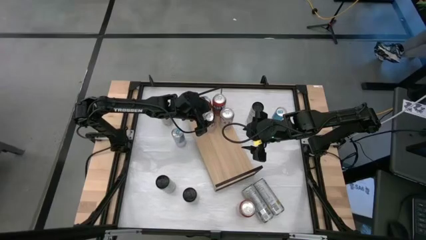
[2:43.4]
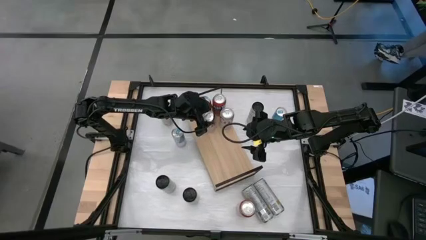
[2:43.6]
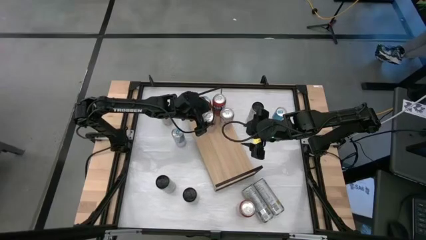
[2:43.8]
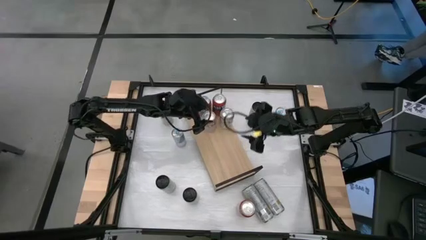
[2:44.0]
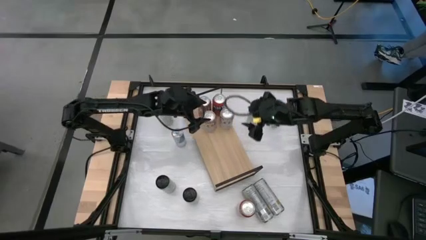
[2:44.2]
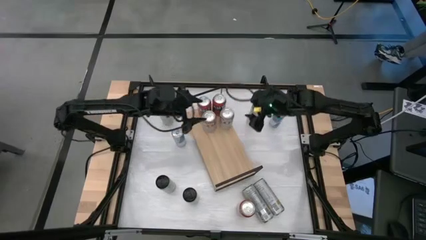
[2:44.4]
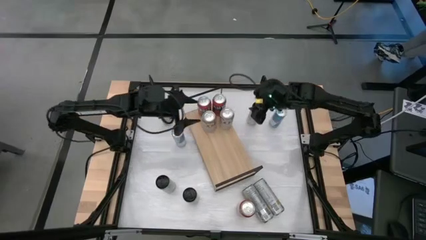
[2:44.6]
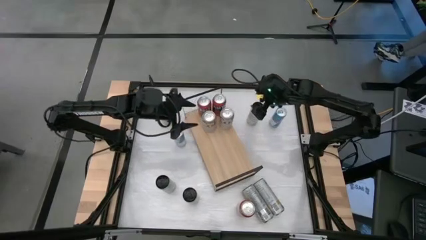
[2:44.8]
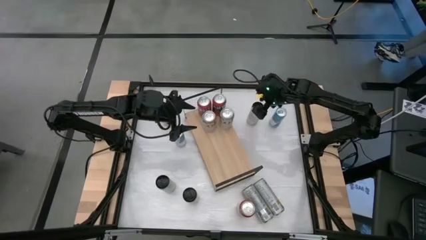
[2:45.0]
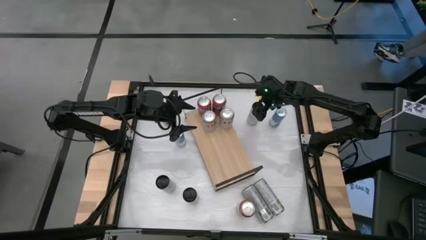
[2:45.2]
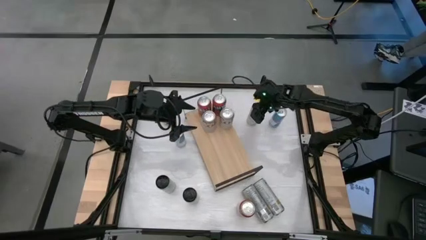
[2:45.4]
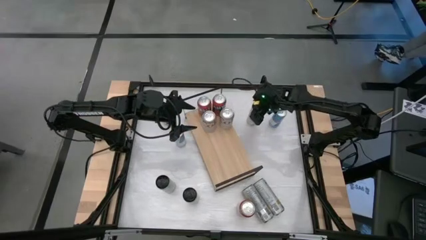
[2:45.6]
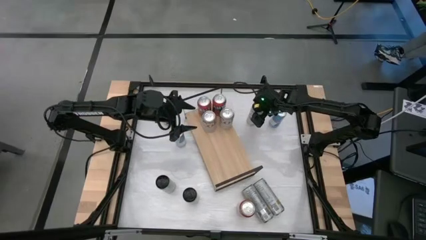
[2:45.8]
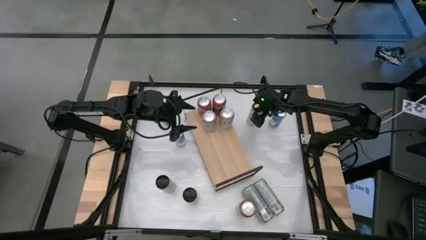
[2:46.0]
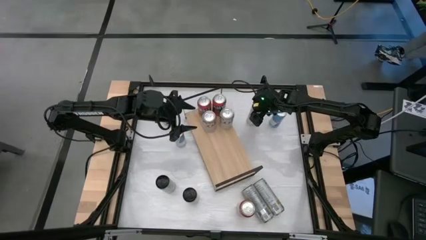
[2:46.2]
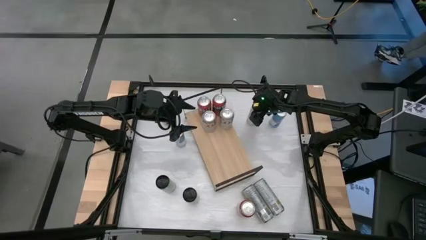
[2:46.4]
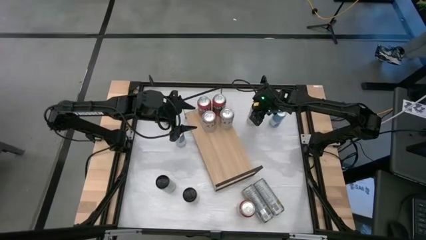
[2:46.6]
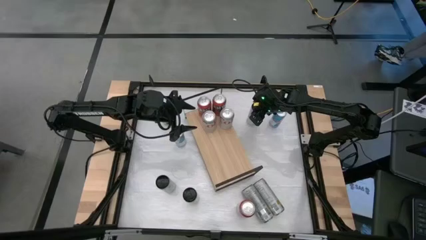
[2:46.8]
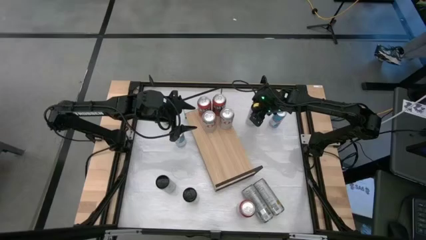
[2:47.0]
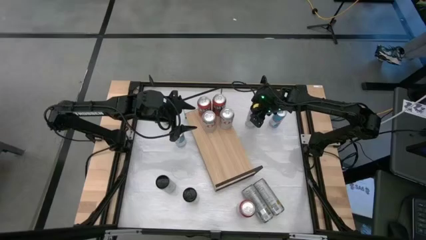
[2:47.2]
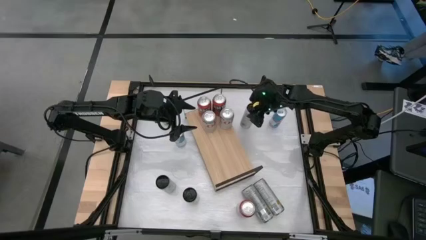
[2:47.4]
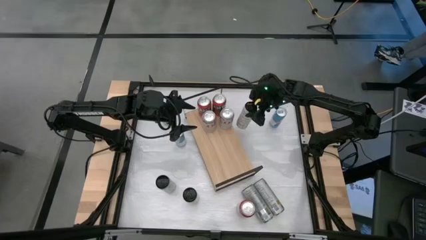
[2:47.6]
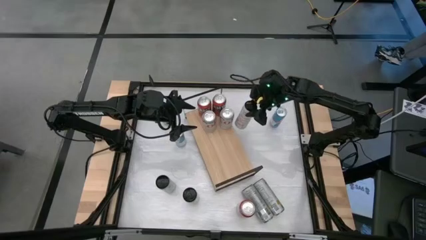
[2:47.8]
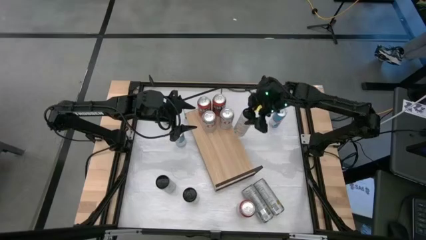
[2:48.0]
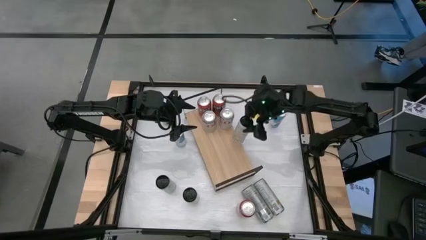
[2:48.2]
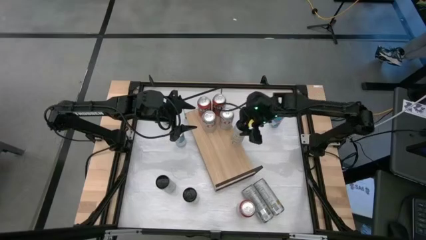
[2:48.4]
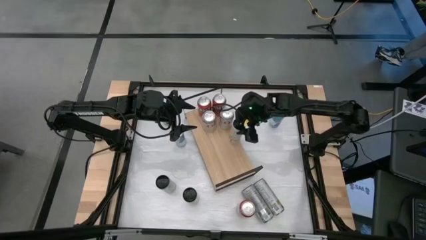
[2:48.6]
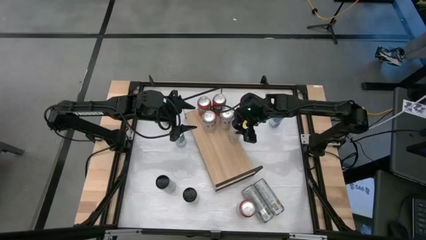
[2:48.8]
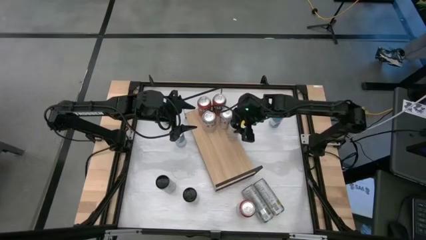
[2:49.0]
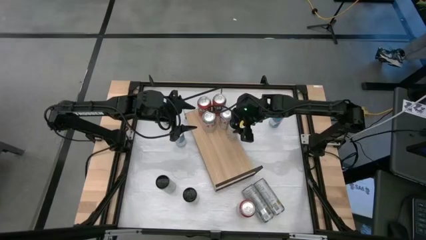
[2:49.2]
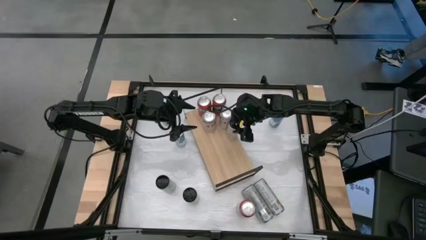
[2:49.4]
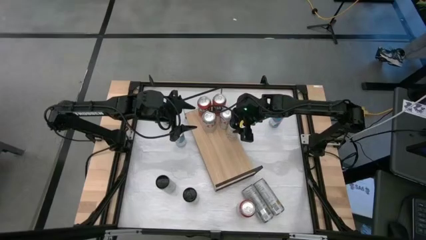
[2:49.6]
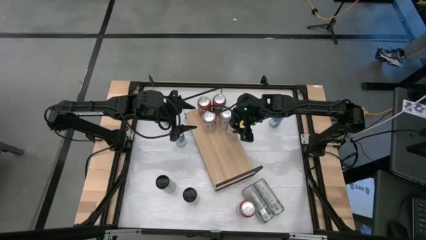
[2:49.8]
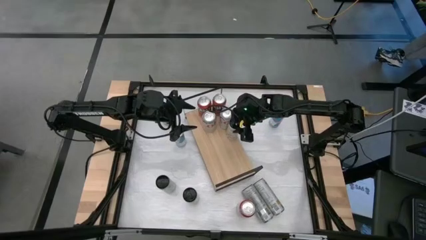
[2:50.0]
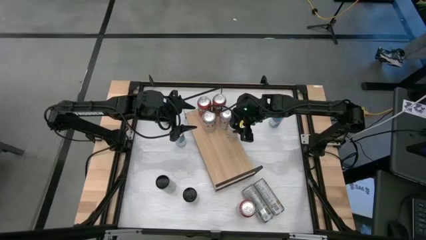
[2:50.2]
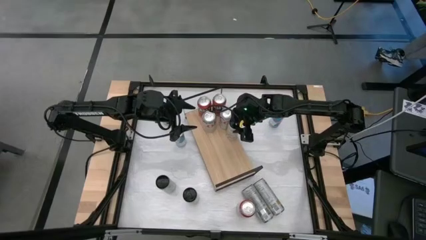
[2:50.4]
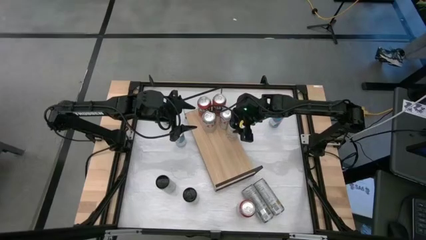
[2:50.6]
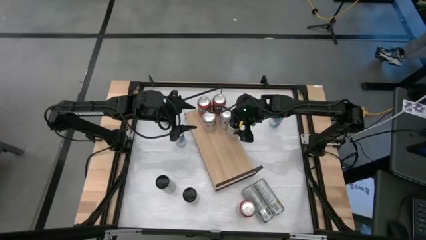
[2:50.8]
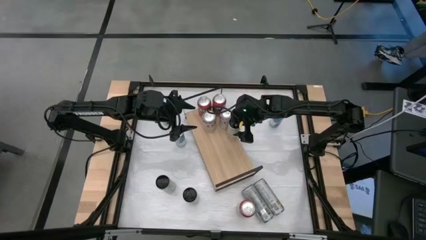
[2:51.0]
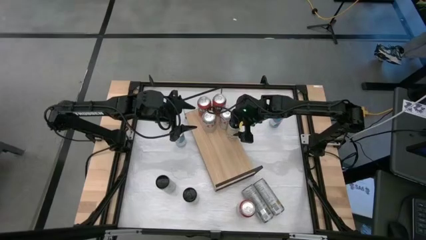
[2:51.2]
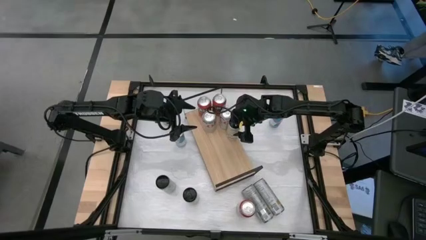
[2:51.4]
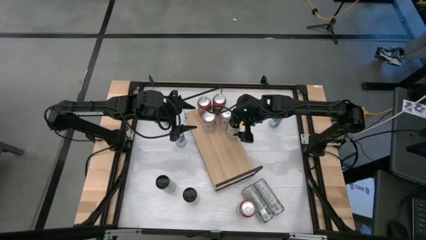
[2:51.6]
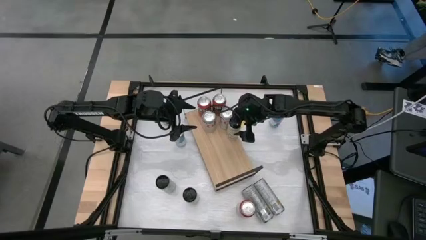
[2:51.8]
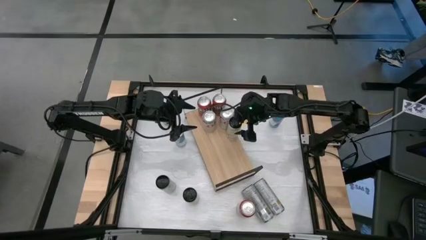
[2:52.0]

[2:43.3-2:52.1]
Task: Place canned beverage on shelf
Put the yellow soda can on the shelf

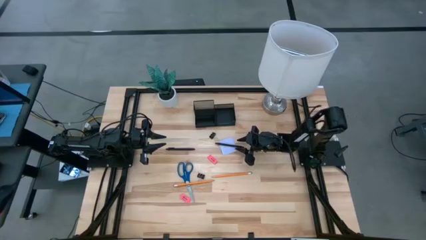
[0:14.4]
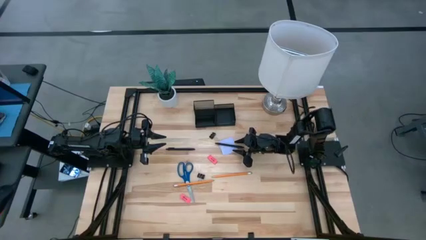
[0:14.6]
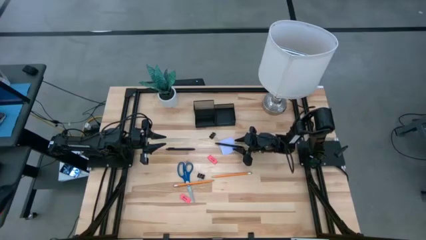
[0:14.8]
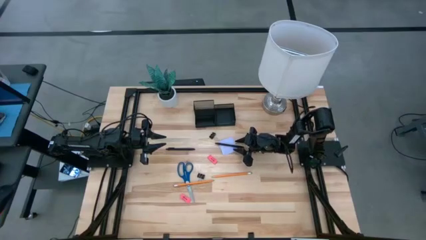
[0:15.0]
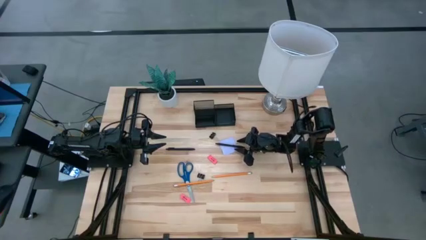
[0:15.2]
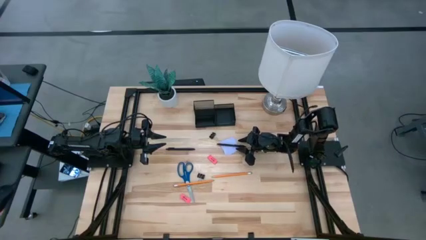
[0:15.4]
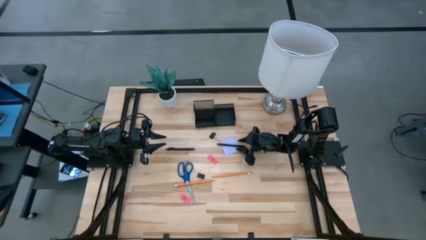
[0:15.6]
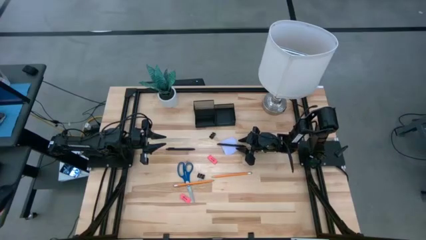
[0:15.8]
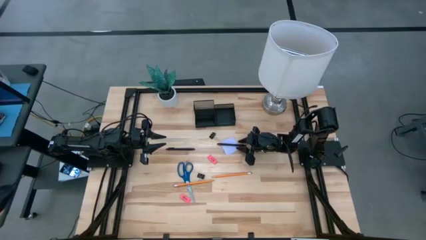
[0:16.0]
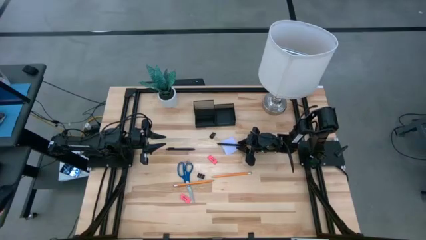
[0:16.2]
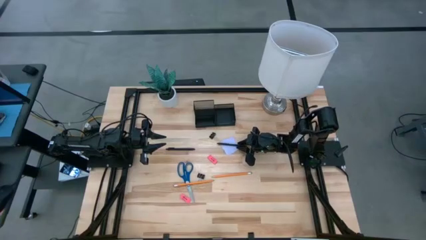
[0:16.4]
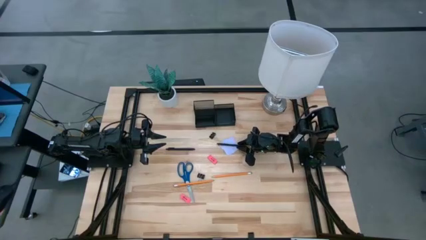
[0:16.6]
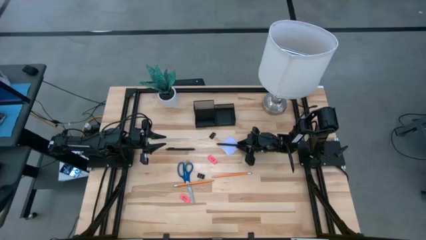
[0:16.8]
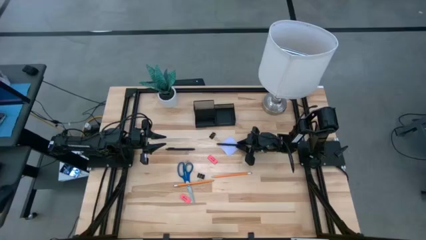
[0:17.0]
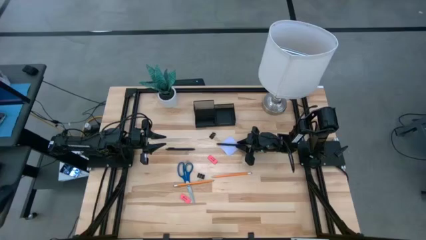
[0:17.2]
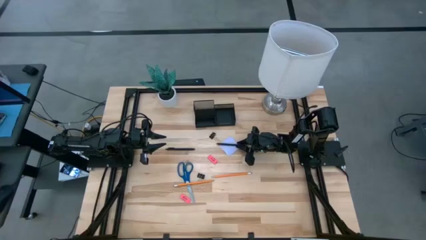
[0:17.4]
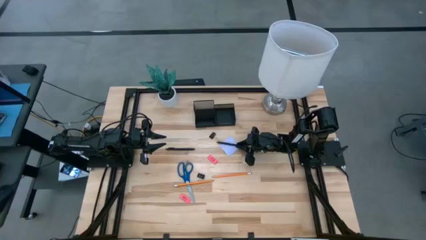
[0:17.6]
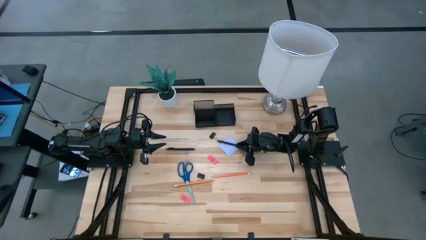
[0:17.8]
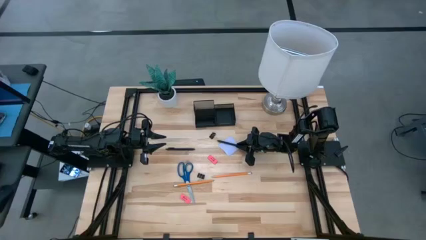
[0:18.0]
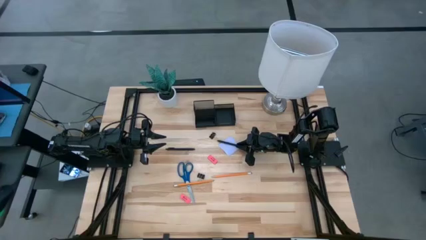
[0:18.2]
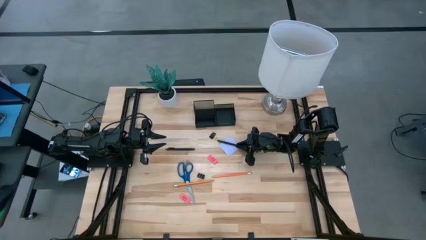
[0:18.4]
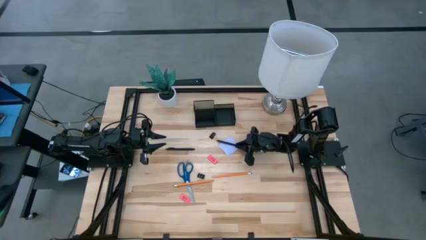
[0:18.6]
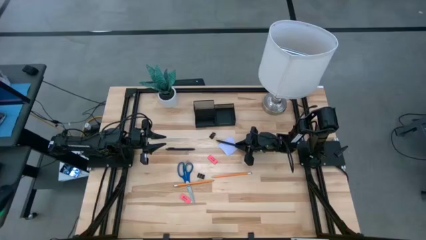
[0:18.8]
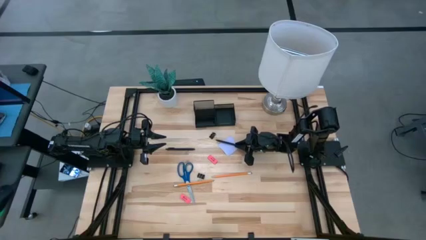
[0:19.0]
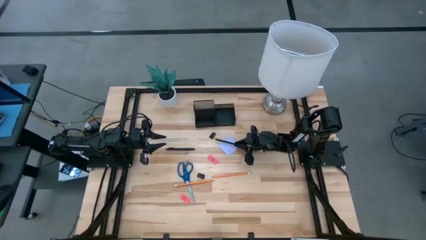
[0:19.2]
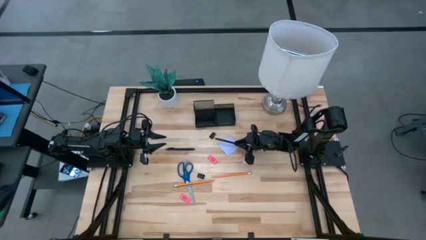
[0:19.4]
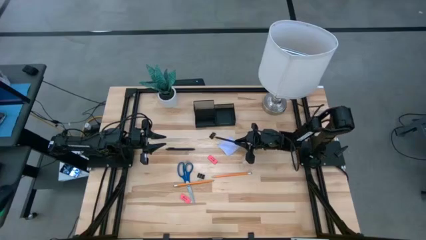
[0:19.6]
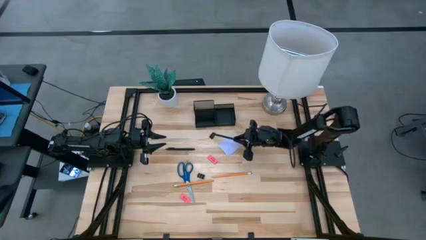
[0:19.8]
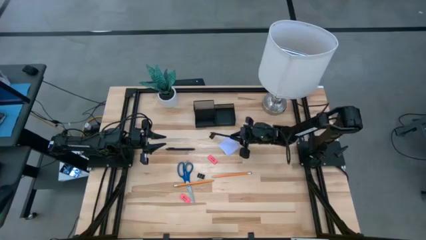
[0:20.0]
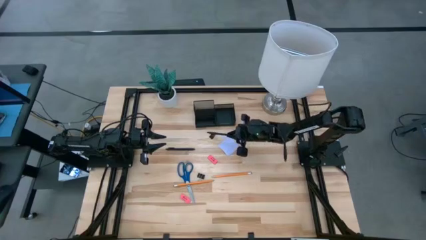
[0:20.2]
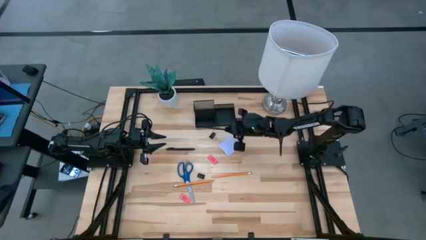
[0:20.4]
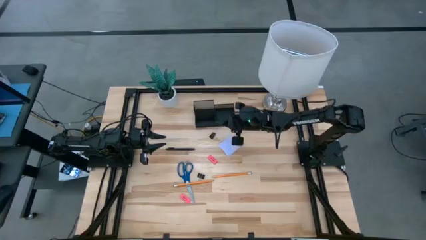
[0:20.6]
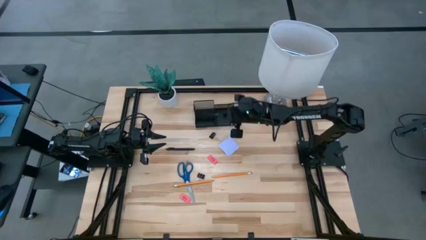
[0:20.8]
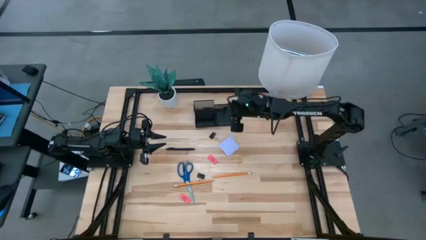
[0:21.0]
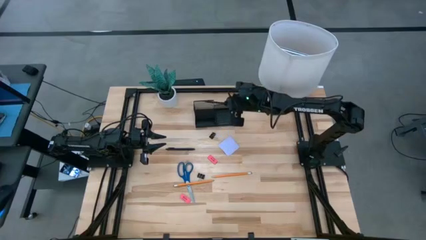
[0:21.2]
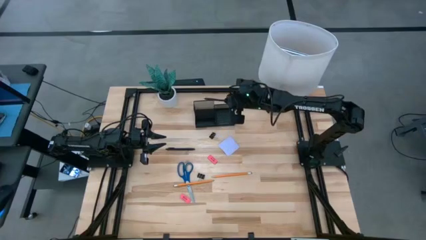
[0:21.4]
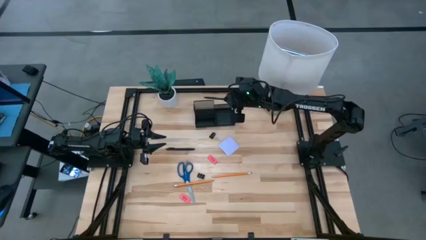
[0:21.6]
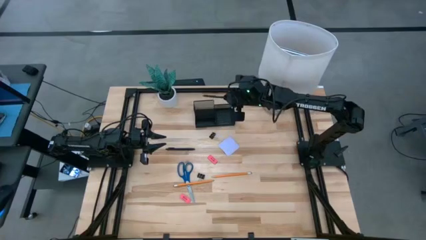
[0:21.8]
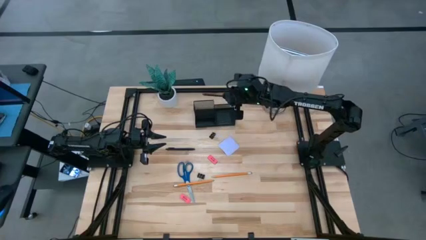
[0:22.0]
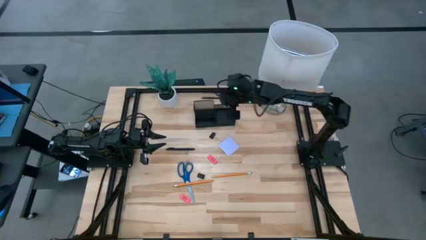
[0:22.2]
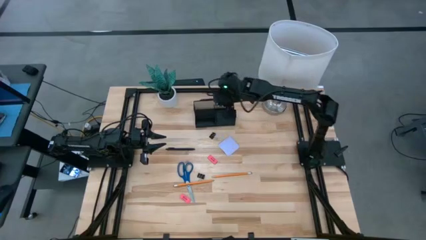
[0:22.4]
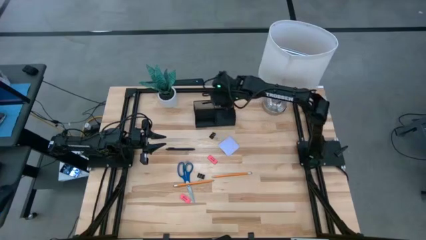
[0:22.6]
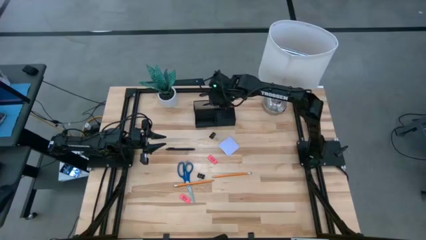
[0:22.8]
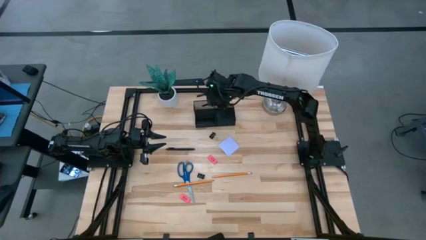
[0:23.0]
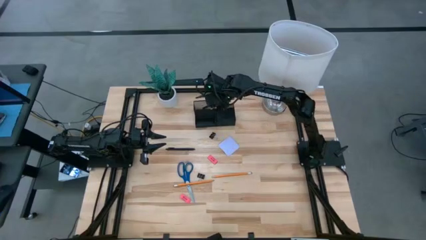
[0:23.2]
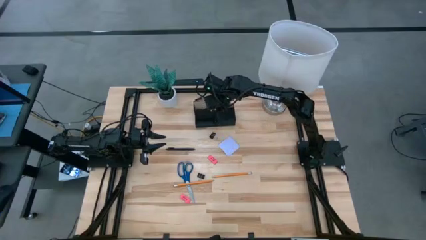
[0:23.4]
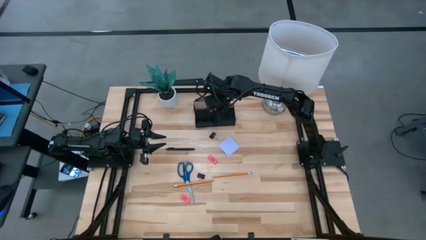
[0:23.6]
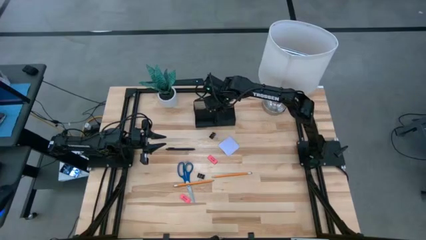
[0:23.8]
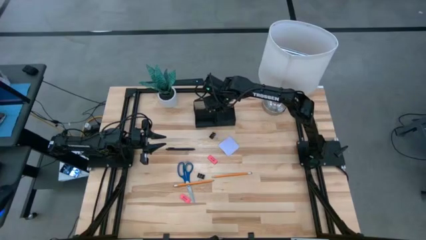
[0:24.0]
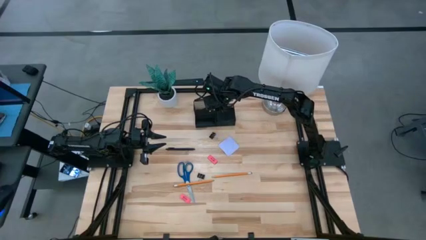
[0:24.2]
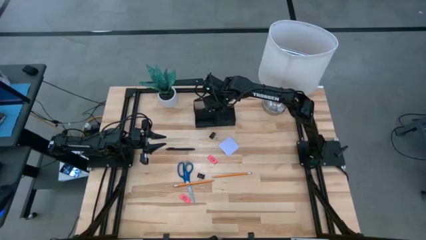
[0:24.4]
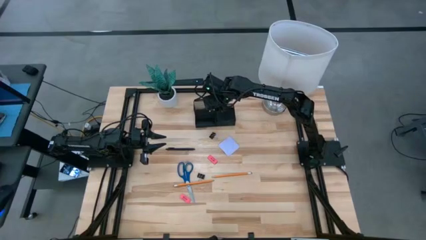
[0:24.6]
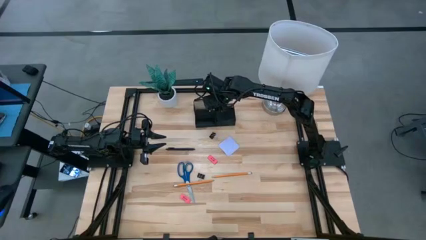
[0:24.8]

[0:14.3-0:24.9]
Task: Pick and place office supplies into organizer
Put the right black pen into the black desk organizer
